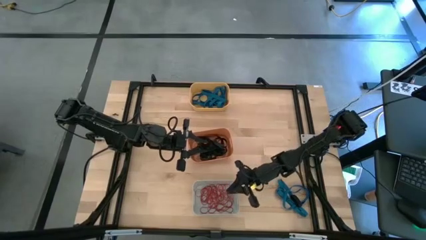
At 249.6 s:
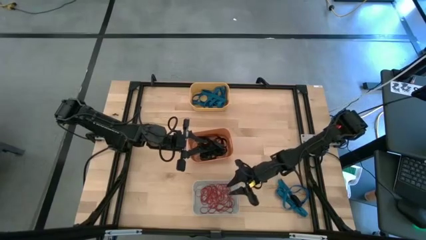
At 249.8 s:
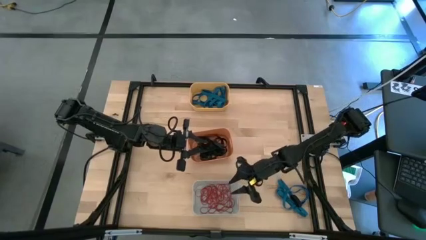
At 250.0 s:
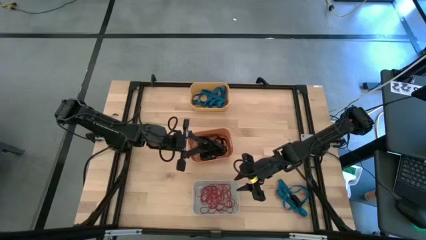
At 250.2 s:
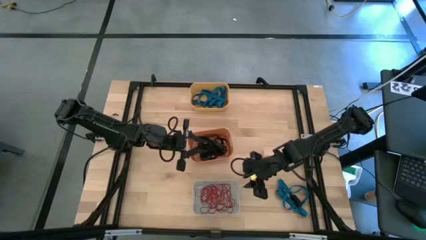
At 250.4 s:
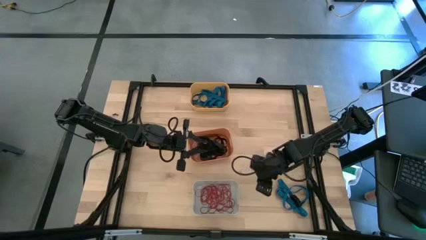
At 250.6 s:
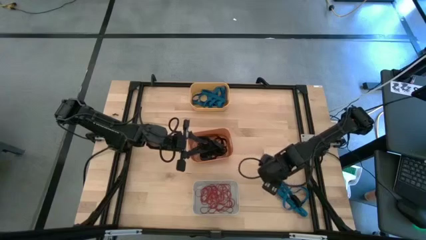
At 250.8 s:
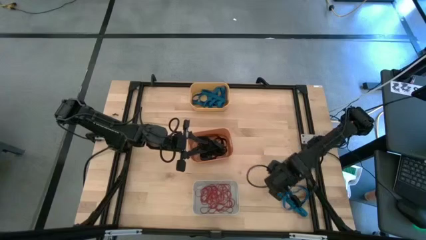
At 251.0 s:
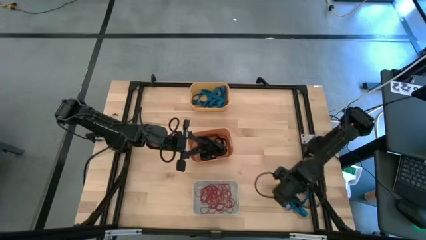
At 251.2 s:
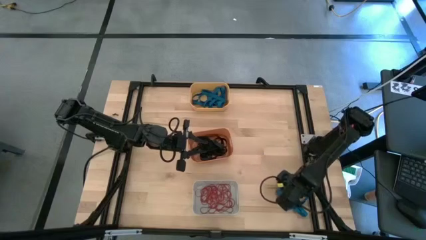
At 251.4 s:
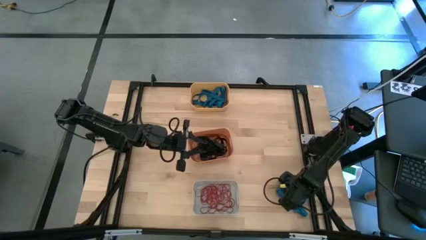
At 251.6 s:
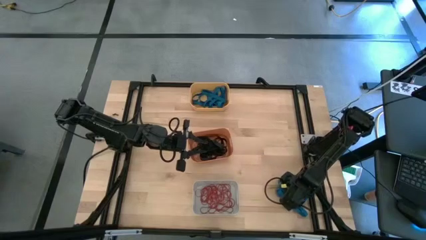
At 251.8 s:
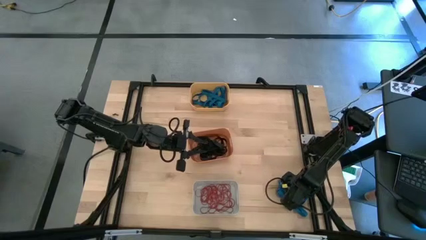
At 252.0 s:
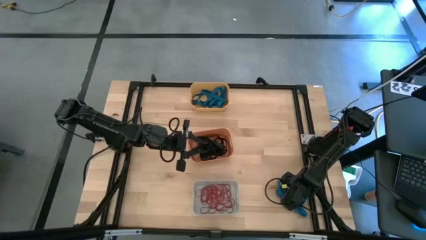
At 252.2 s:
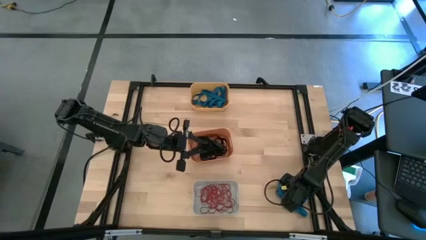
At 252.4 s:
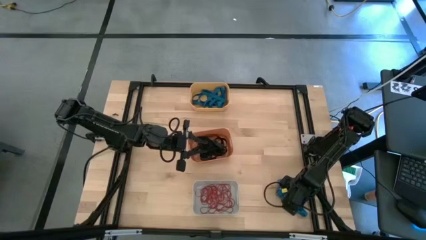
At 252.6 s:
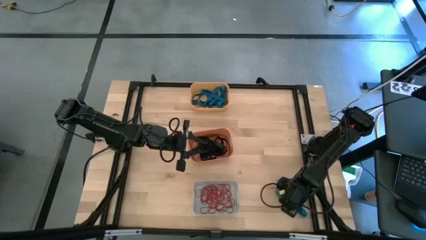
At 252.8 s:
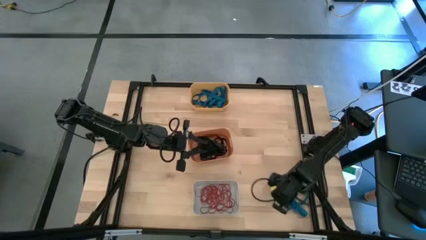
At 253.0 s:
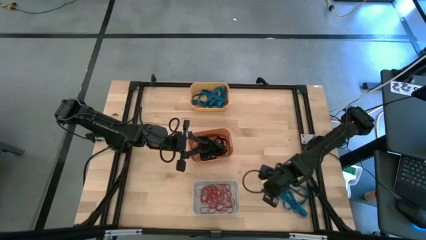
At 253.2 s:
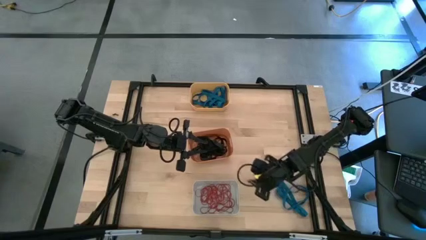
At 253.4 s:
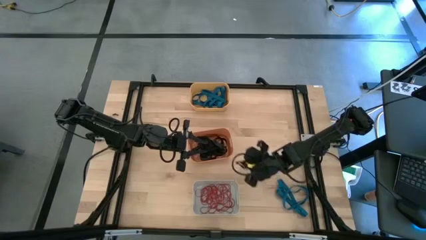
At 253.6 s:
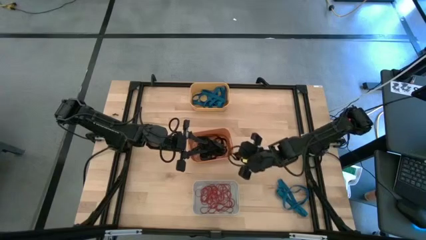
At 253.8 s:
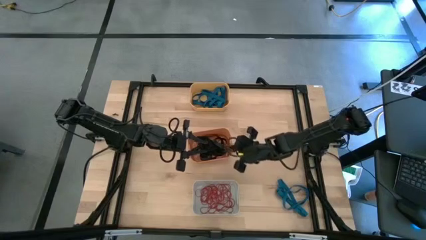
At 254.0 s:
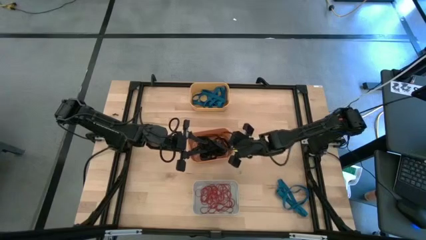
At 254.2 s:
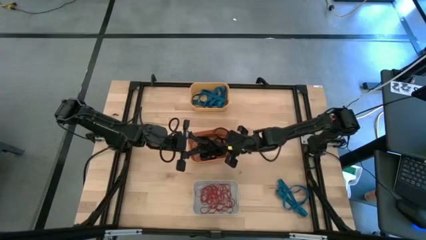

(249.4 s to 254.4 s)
Task: Sort rubber bands into baskets
Put the black rubber band in the orange bin

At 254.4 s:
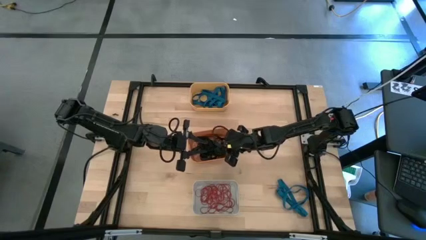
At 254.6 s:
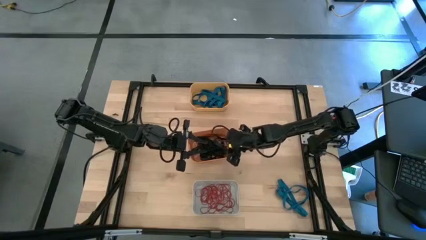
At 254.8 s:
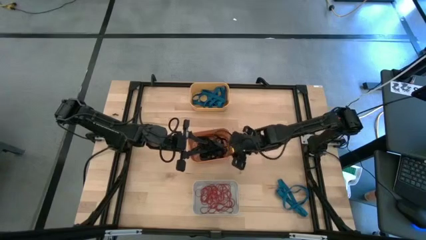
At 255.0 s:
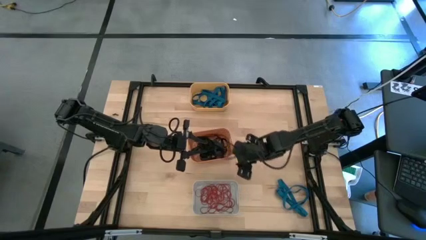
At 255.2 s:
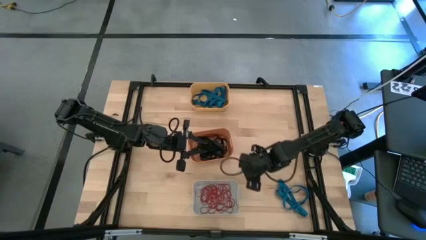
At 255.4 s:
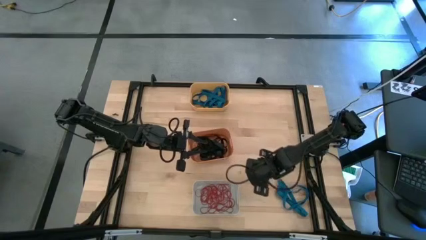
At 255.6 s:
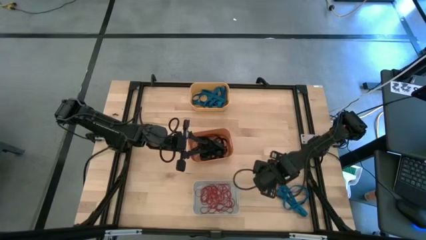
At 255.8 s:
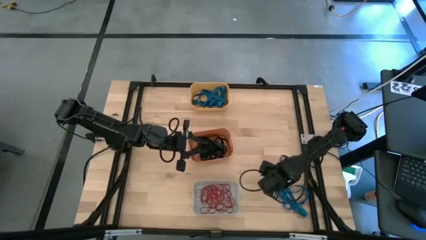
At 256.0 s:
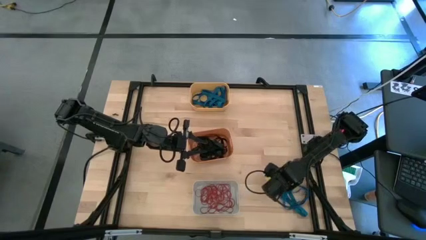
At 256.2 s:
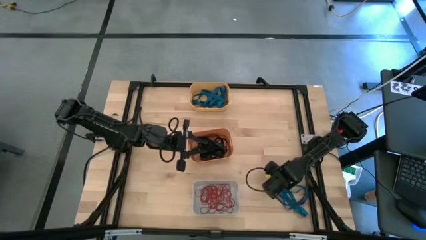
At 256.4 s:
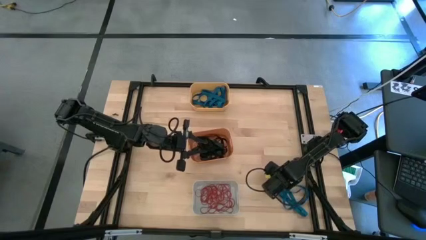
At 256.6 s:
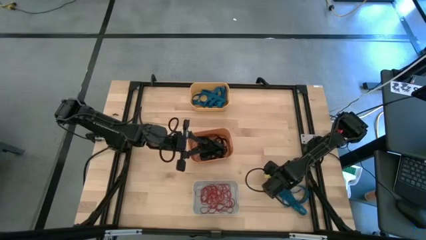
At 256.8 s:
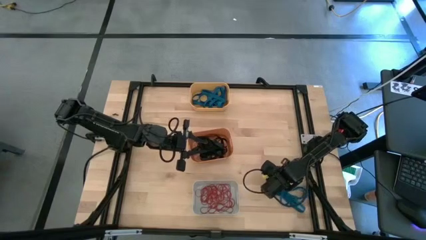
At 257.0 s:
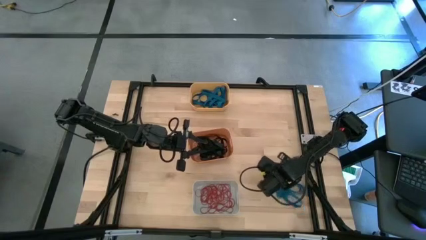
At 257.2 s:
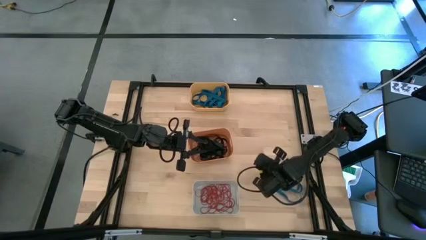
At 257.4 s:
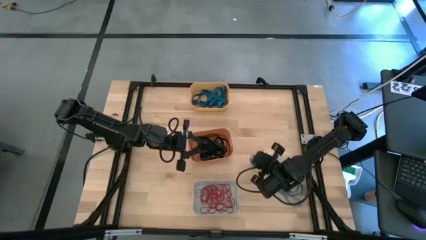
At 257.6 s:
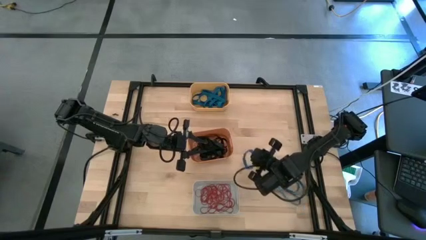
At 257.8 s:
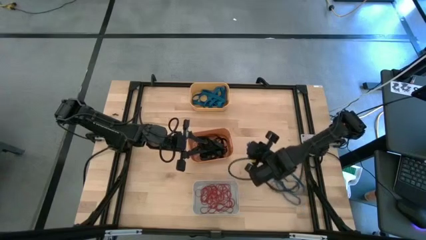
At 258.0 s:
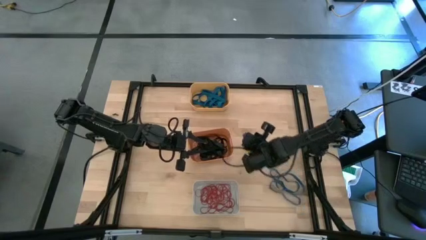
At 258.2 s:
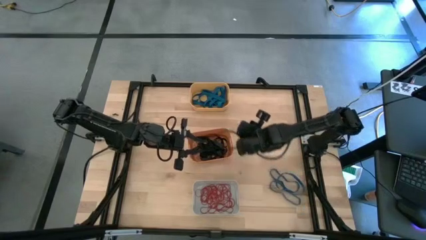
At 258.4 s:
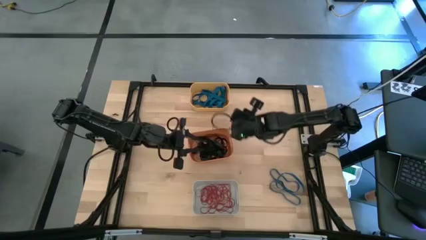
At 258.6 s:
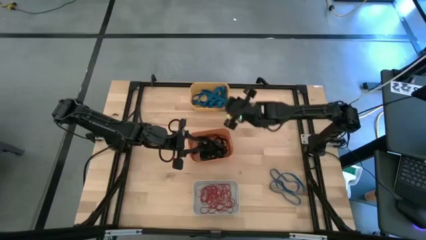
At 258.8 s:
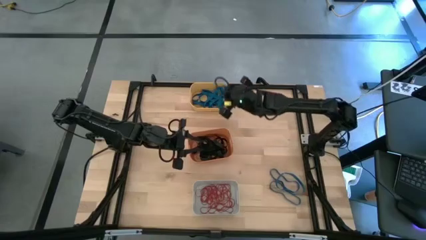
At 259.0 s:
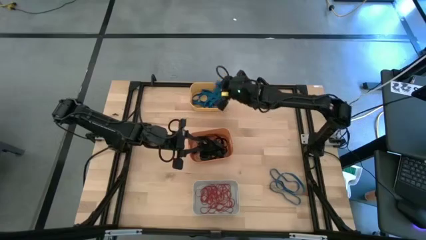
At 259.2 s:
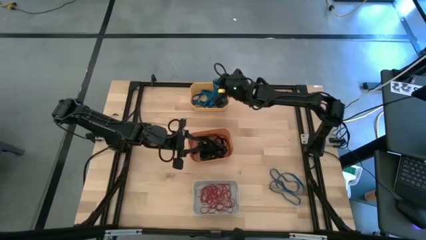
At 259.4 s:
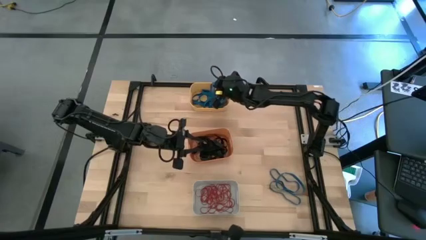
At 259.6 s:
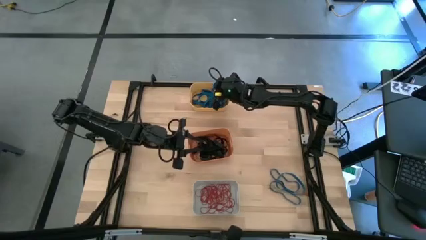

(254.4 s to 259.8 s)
Put the blue rubber band in the yellow bin

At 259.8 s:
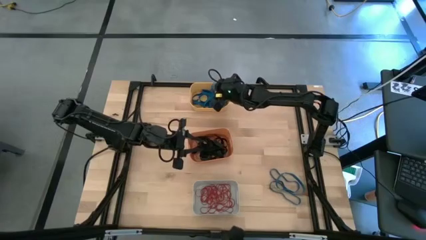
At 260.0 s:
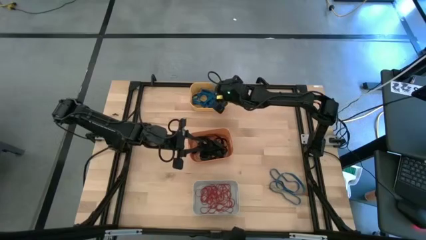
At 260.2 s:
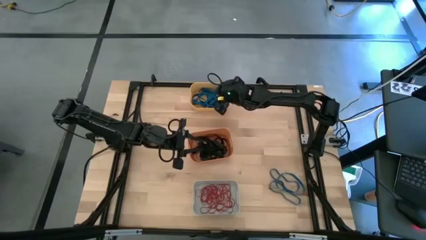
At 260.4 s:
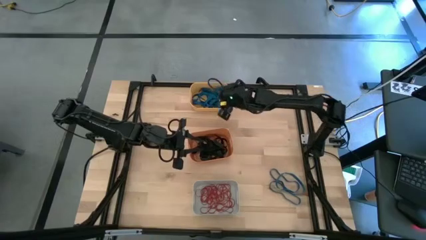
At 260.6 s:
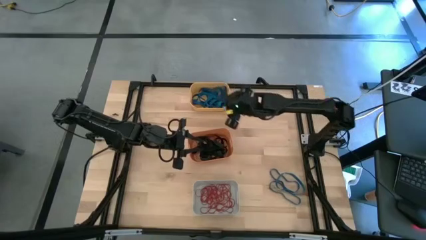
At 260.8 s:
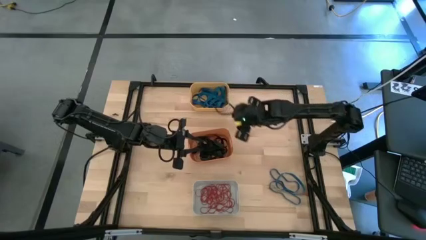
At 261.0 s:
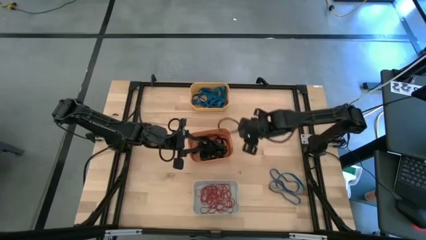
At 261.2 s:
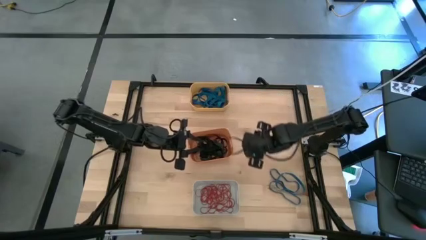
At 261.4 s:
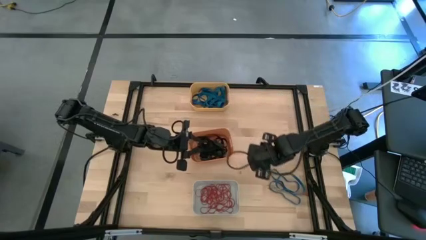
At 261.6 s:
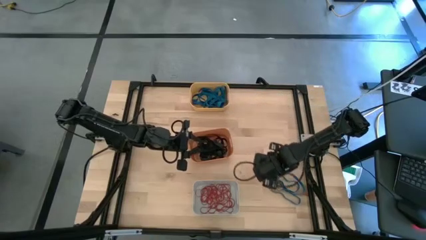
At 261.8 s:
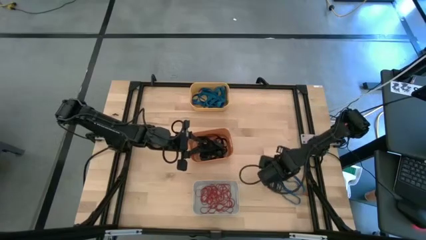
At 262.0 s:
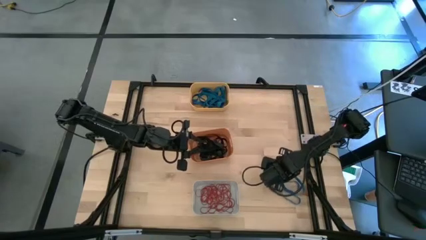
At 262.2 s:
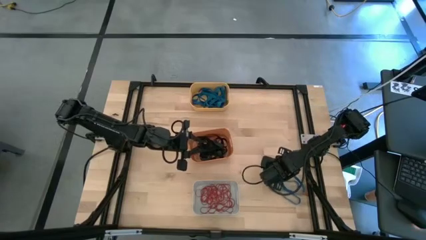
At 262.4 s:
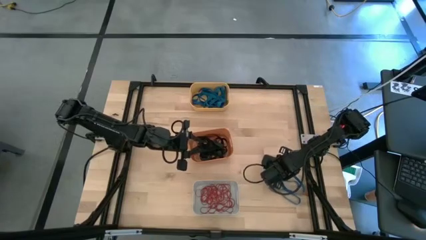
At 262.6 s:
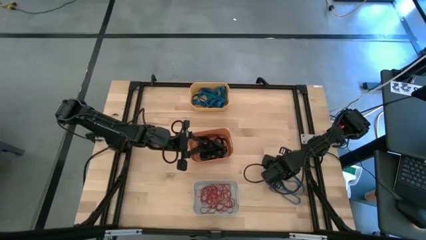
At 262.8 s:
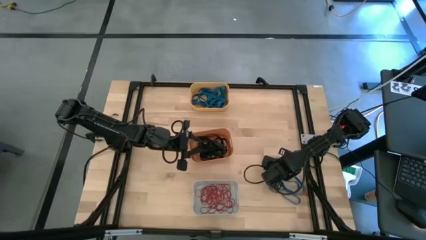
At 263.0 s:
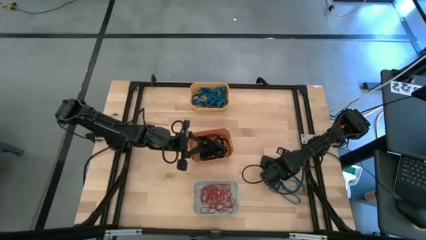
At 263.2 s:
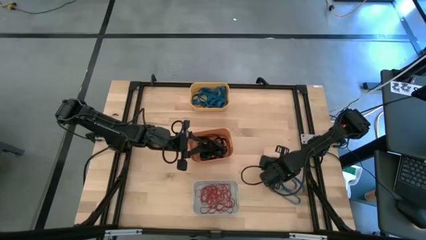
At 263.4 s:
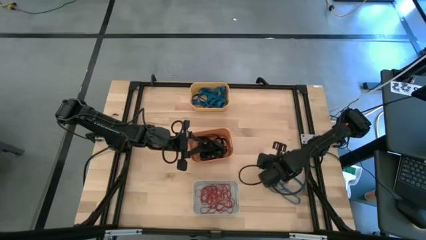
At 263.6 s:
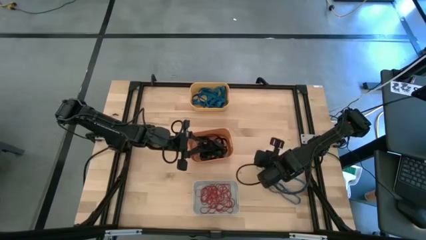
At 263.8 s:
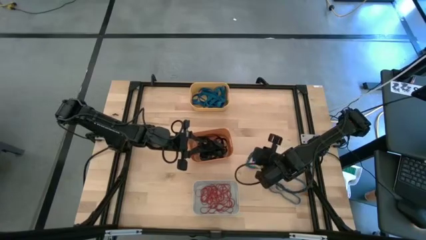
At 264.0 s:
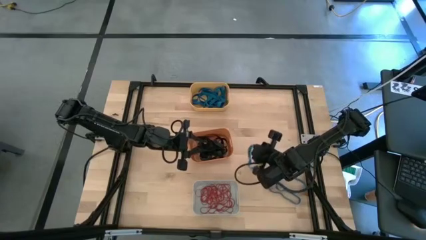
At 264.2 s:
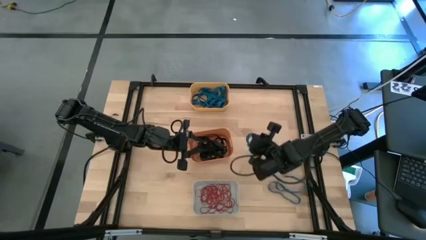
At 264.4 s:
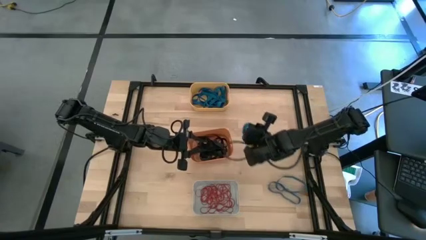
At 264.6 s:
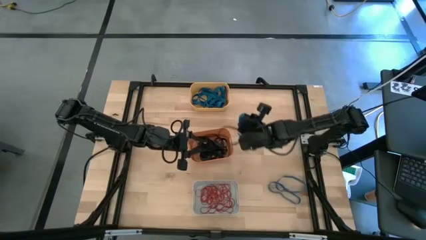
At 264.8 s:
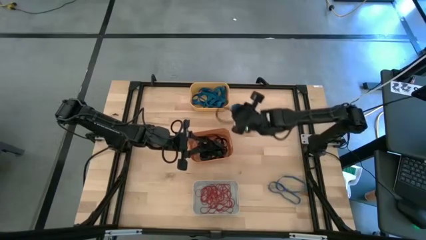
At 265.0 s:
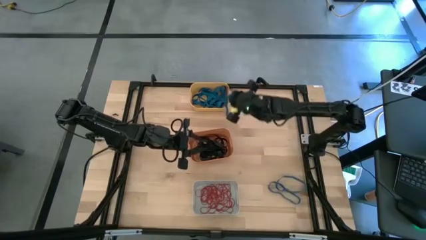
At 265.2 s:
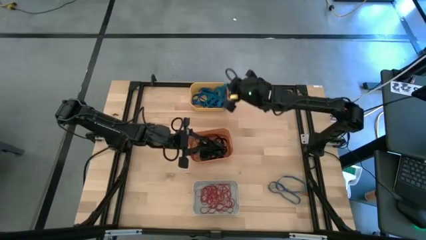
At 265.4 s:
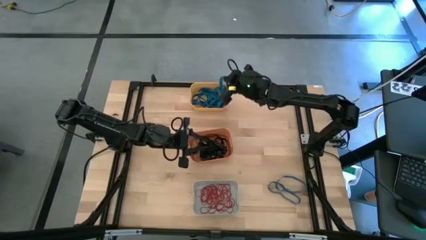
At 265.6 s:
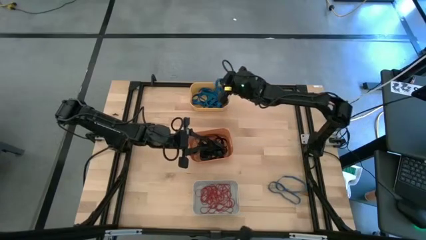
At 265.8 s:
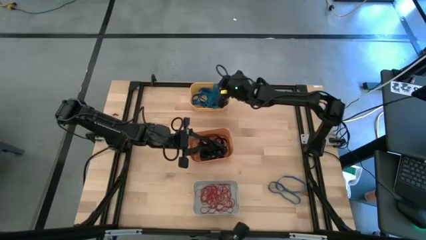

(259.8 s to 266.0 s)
Put the blue rubber band in the yellow bin
